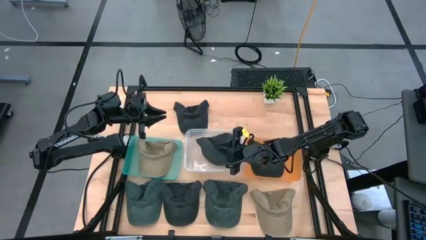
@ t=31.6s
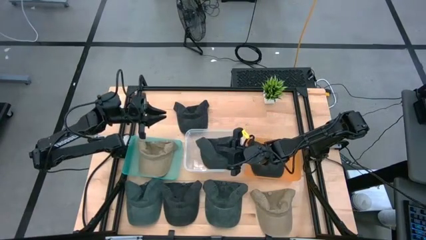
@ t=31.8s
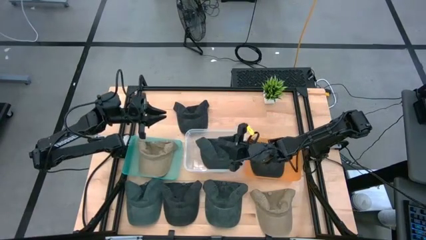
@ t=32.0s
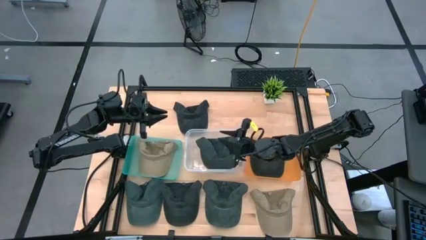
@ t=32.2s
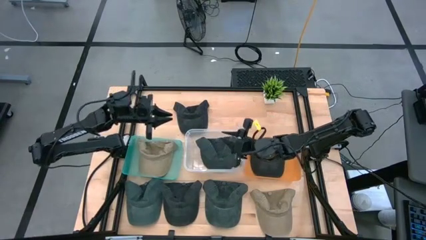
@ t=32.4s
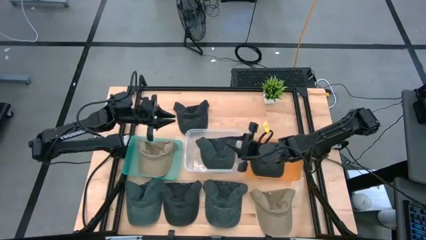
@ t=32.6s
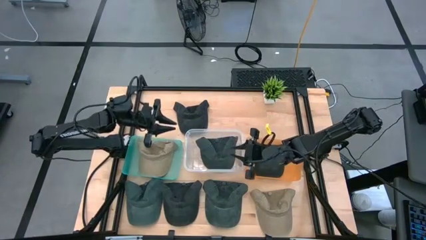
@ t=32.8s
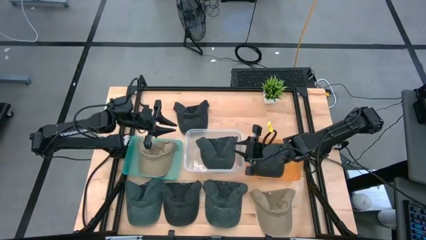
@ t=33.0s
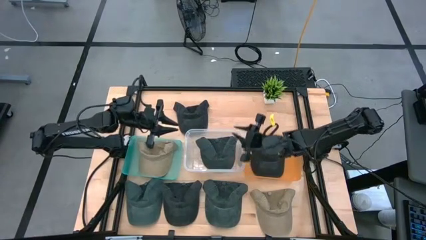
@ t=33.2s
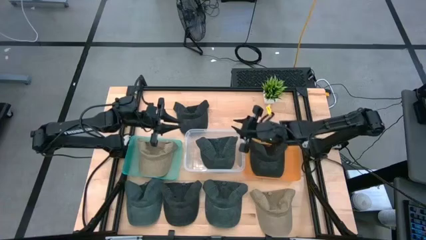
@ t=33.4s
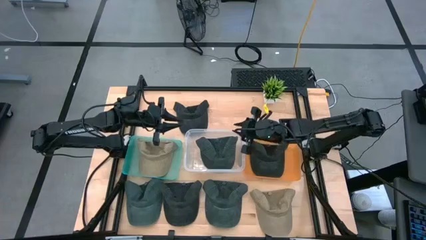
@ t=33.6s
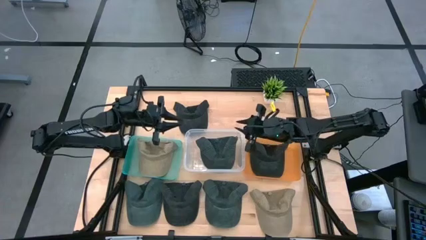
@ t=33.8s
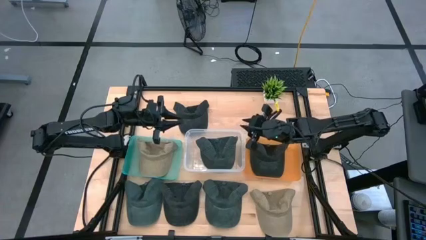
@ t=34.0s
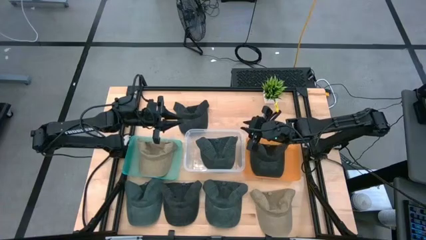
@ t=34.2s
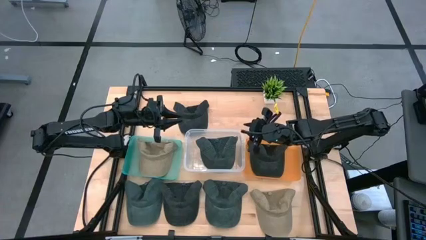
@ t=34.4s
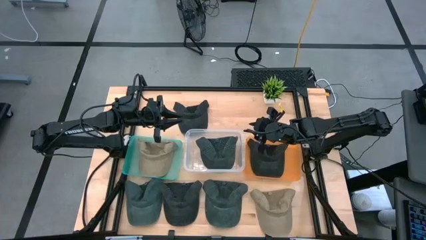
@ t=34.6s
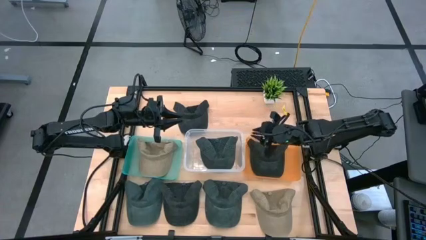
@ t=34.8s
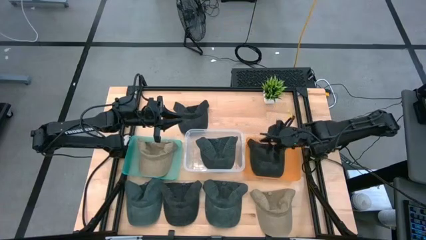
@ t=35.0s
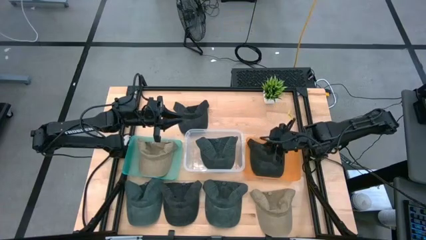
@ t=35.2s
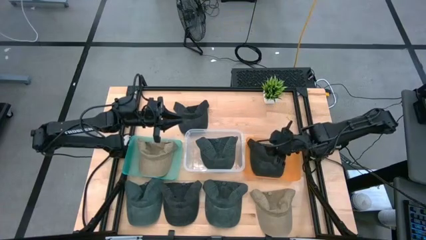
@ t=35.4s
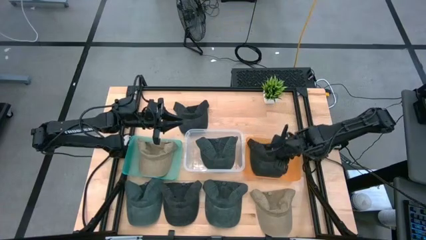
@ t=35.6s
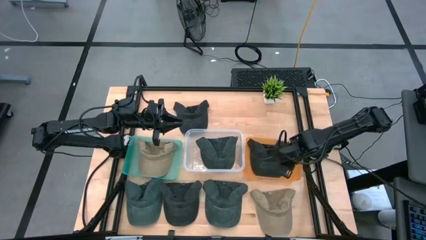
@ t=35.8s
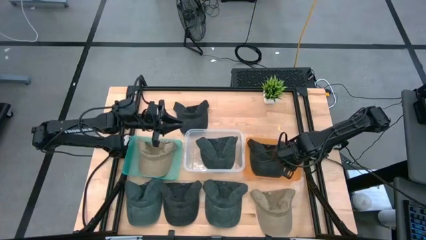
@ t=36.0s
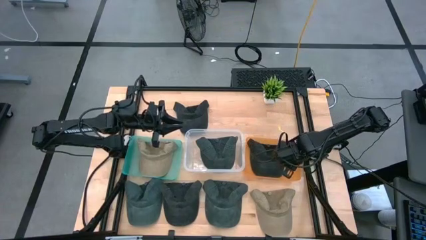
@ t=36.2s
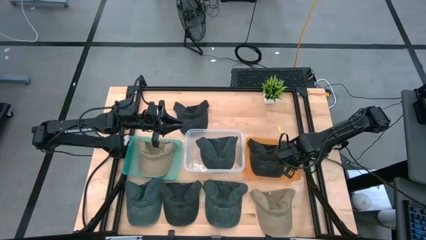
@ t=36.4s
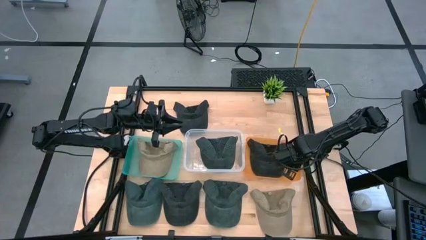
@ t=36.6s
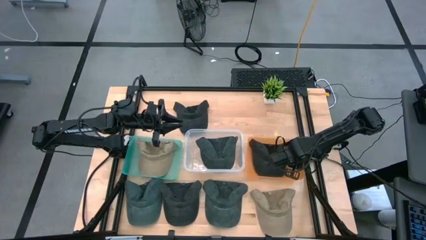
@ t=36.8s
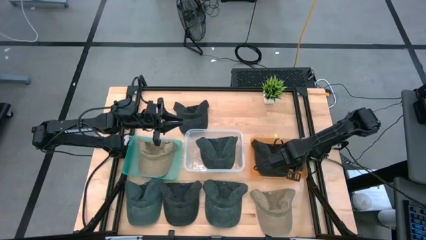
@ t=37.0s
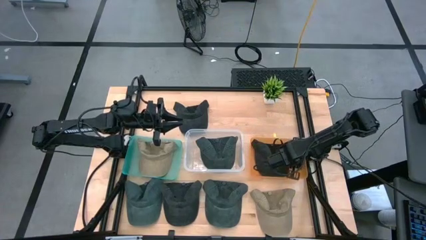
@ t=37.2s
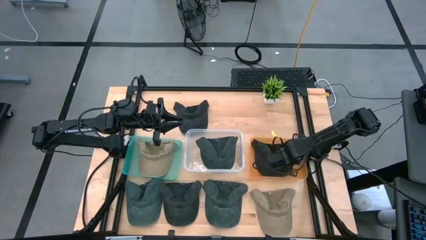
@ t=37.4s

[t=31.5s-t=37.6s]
Task: Pick & Place hat
Adjust the orange bin

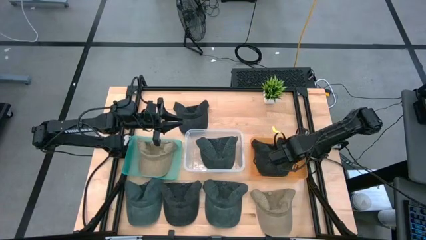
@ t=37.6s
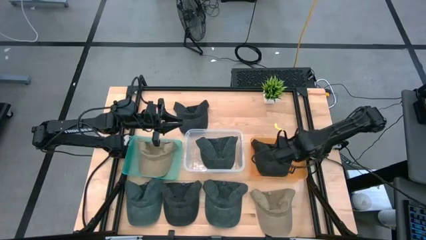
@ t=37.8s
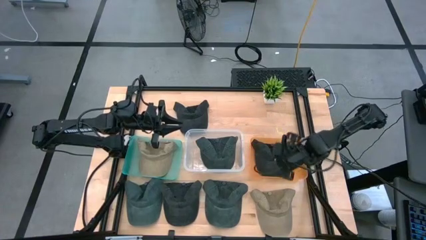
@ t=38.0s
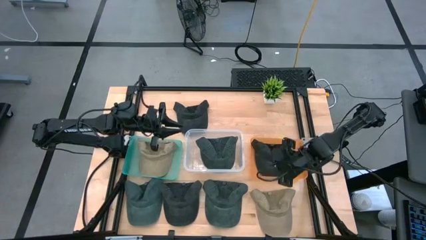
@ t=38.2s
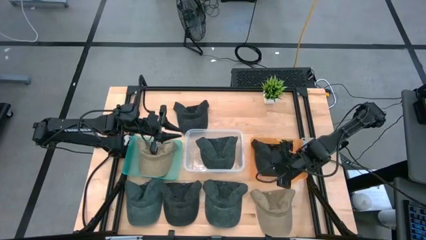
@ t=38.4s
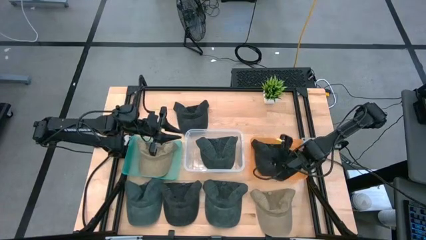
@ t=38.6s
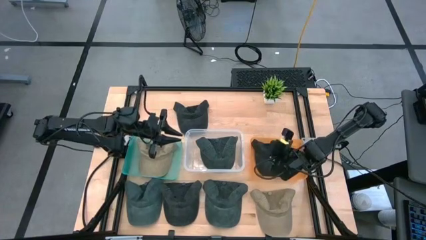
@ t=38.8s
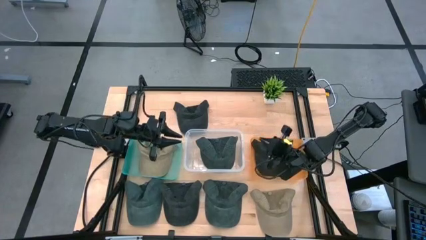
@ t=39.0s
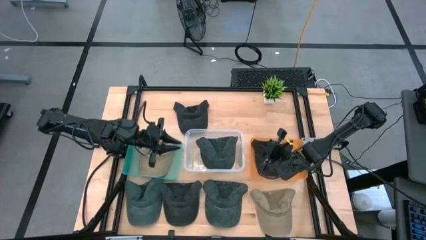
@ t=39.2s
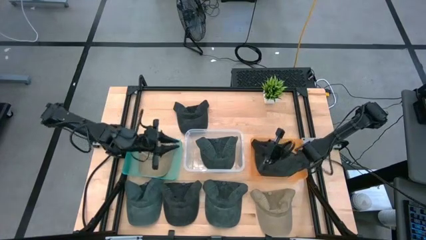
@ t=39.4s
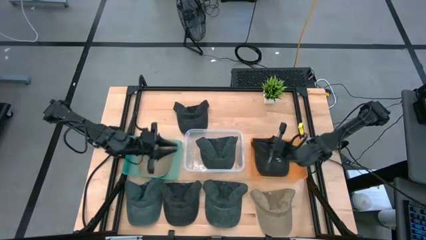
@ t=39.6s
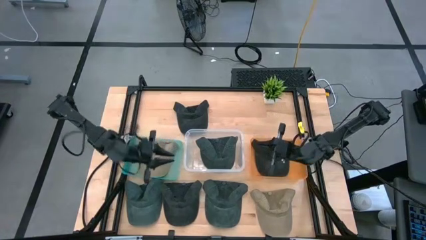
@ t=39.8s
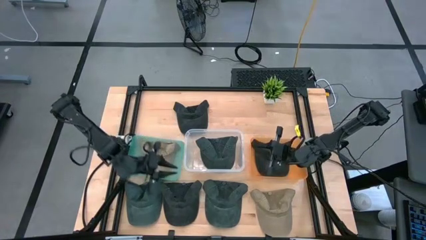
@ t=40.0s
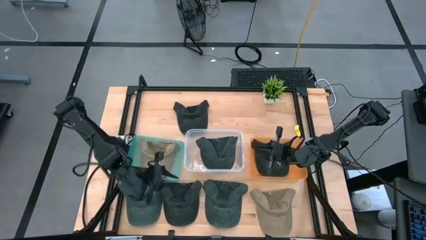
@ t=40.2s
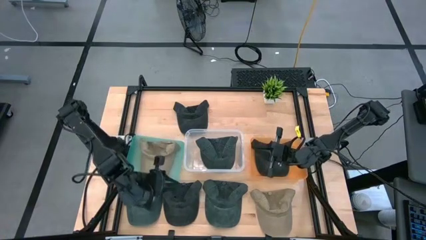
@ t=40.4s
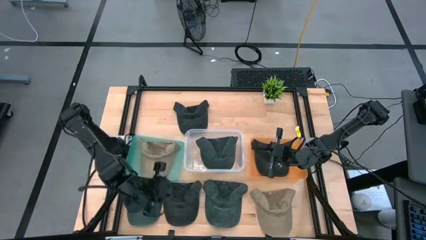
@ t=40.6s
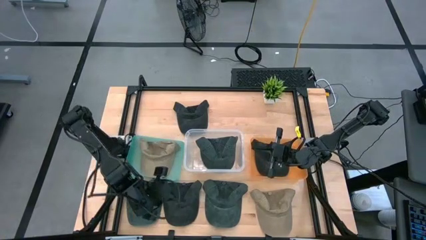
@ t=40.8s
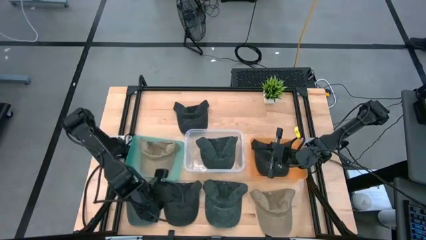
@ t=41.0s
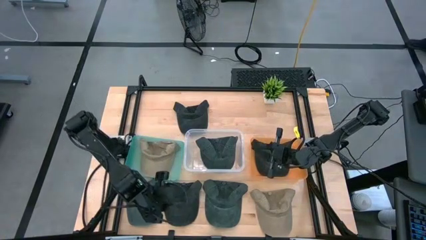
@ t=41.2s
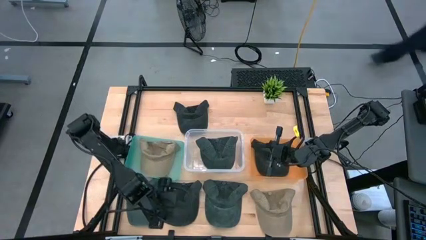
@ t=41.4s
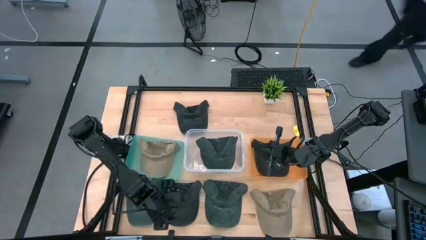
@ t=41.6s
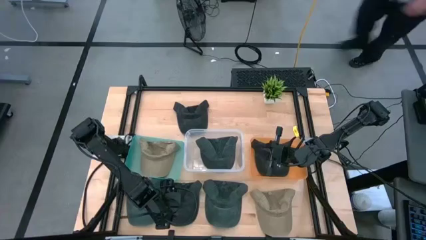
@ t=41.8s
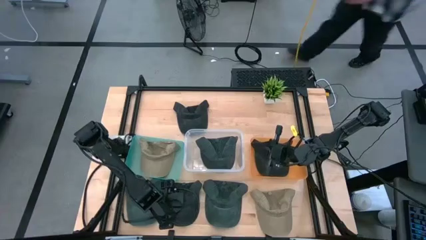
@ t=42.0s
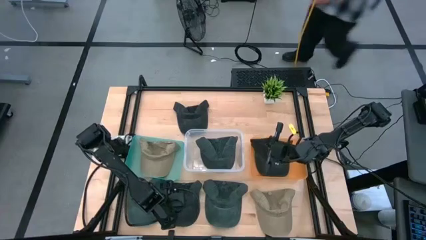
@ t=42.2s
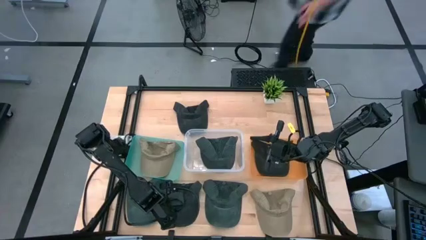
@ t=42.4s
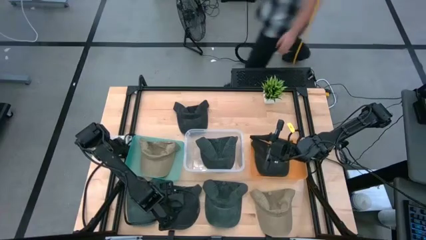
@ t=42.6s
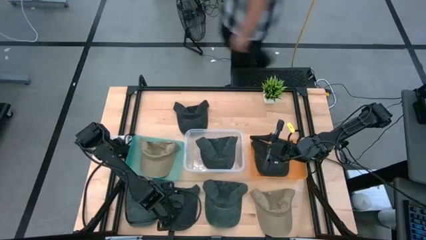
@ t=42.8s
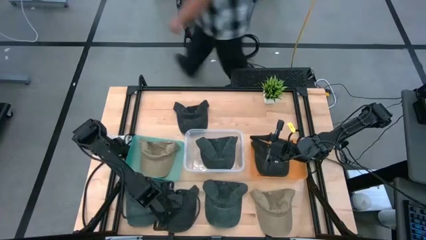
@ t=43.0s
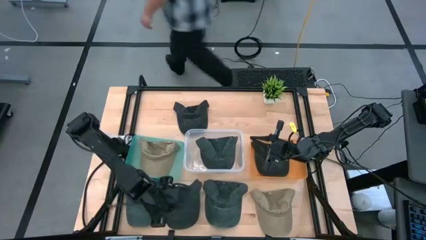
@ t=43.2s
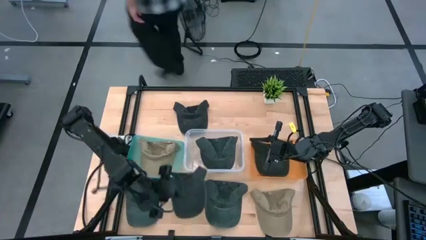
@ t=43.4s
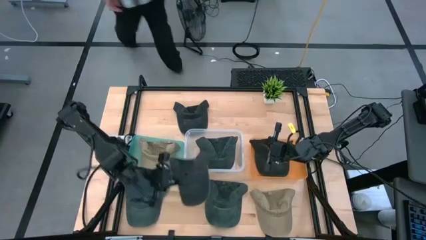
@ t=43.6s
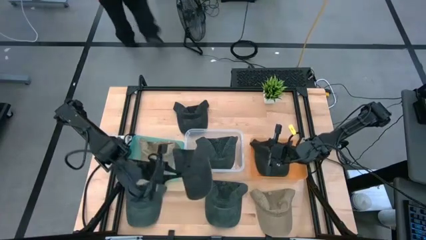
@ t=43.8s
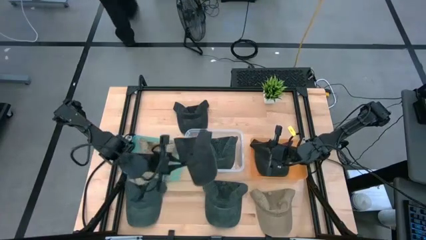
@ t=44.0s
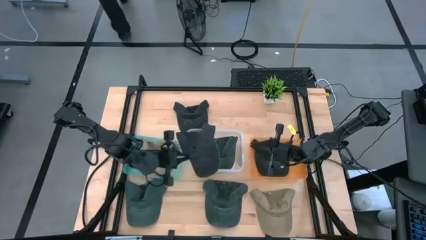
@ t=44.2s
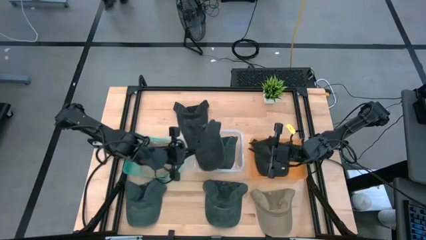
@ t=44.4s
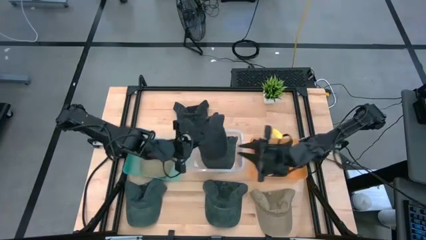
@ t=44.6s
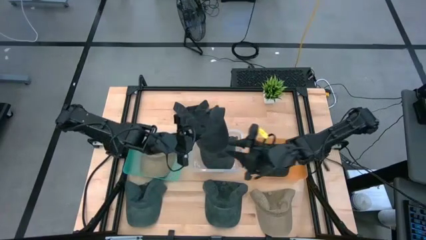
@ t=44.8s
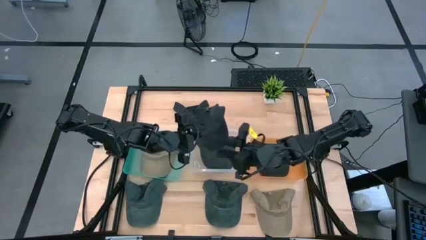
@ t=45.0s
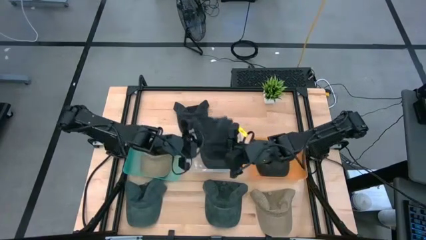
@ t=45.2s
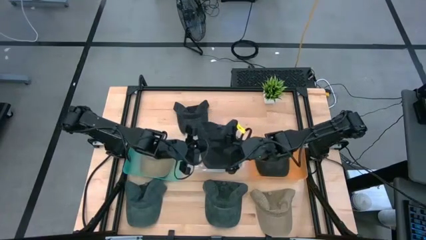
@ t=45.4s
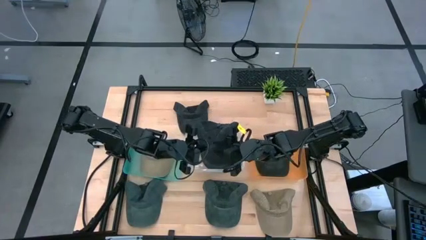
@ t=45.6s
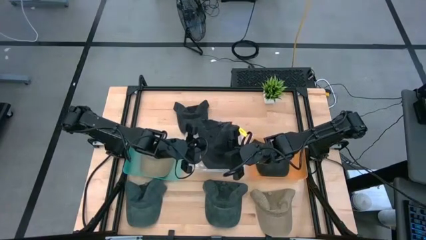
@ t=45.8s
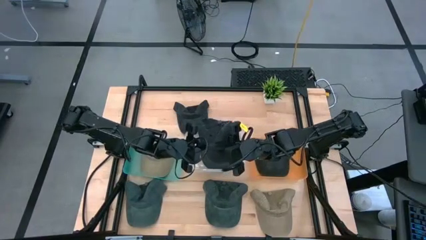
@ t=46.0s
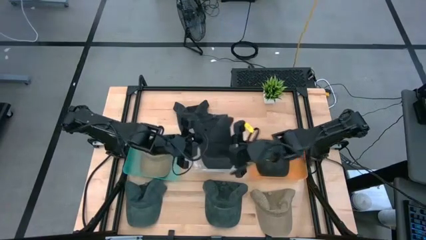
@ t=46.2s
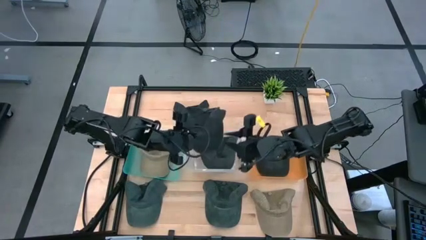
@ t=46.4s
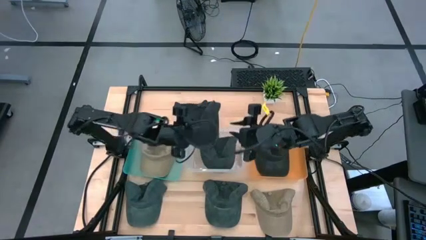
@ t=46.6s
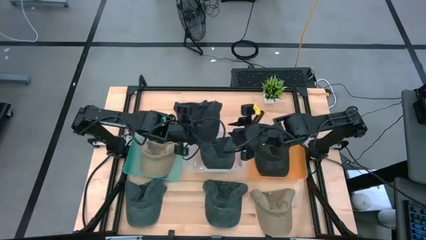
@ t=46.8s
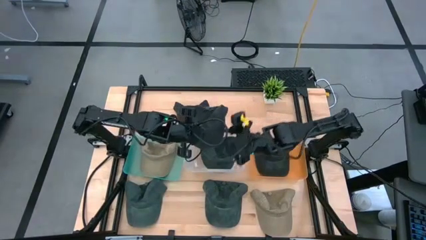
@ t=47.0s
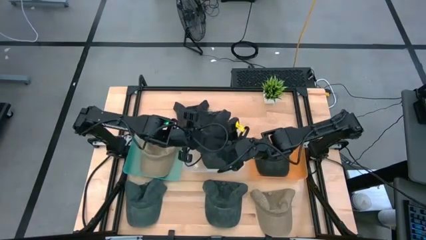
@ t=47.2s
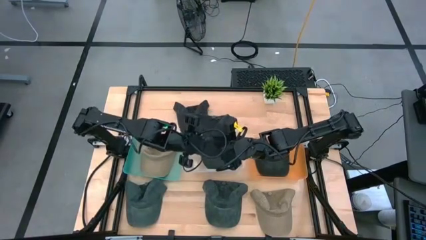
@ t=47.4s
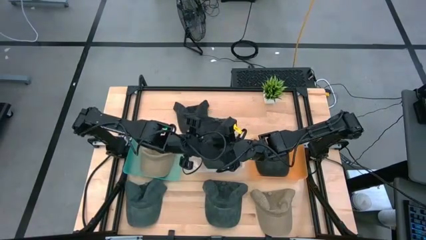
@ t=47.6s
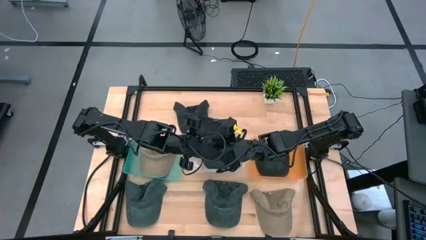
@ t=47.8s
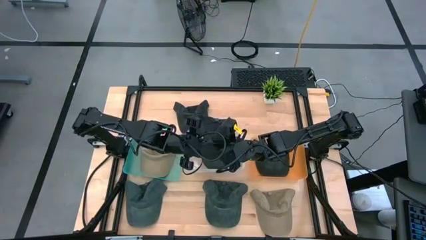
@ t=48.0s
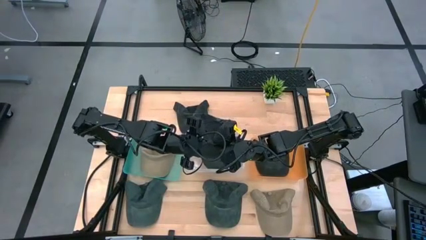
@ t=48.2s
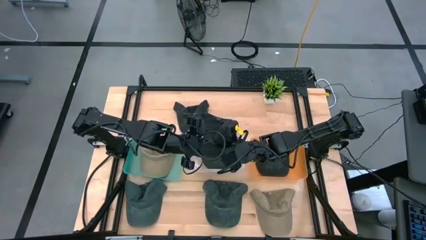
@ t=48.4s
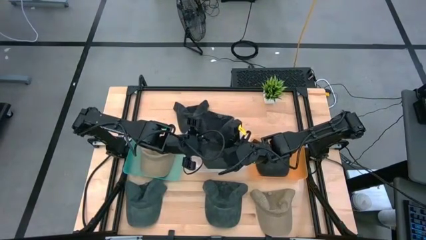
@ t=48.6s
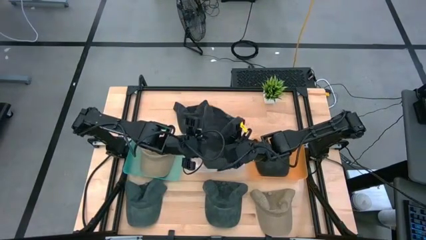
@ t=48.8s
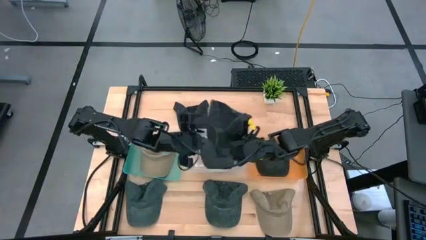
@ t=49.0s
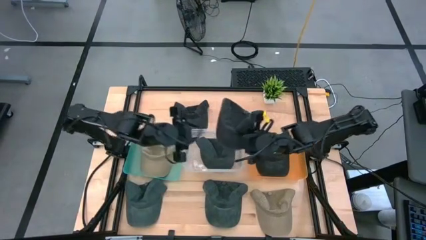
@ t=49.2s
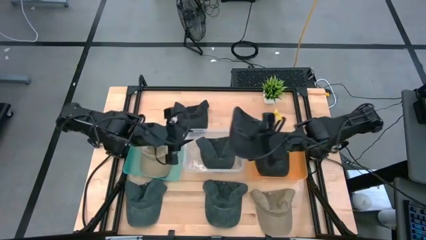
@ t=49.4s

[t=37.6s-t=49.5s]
Put the bottom black cap into the orange bin
